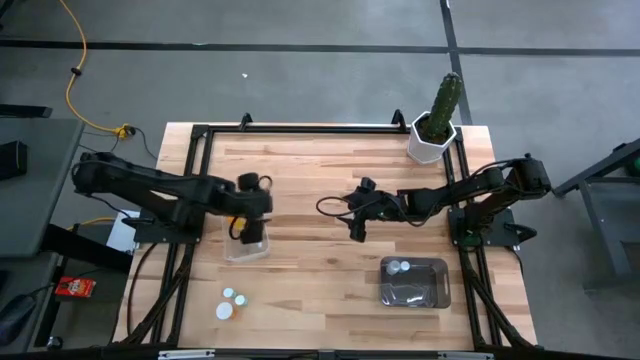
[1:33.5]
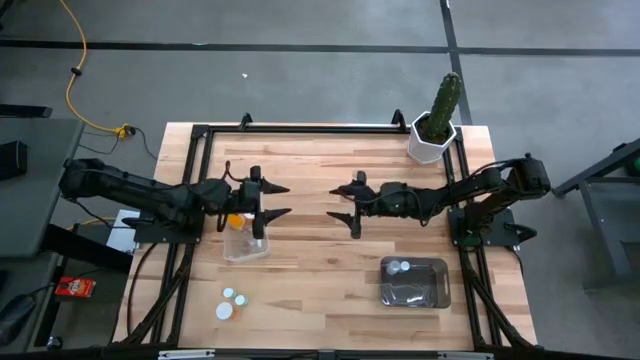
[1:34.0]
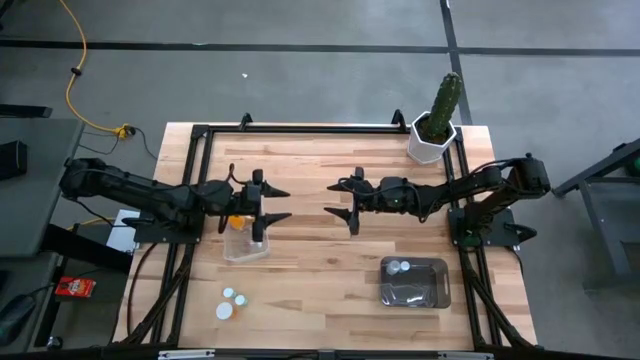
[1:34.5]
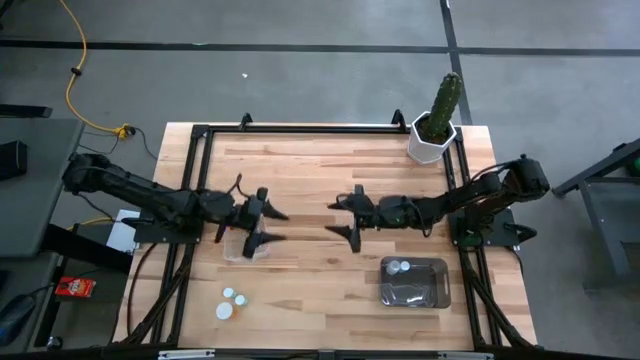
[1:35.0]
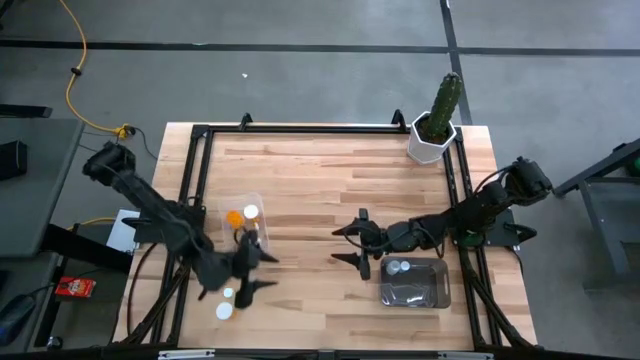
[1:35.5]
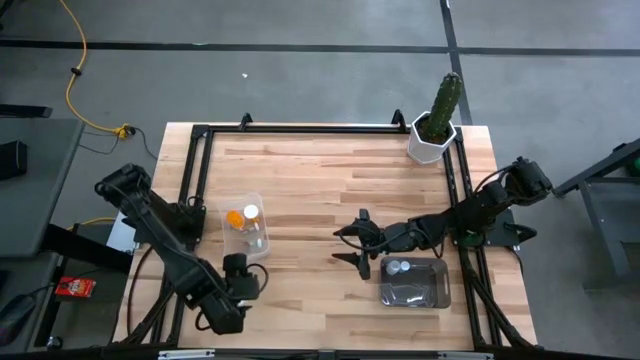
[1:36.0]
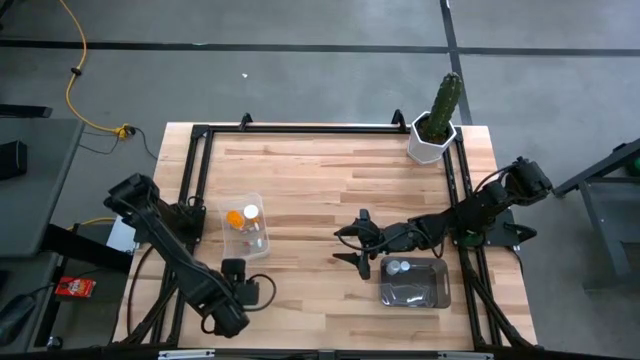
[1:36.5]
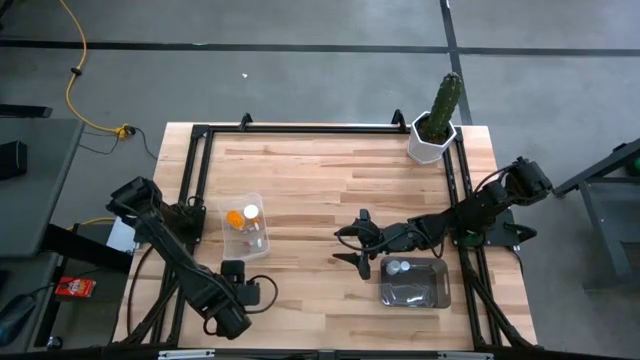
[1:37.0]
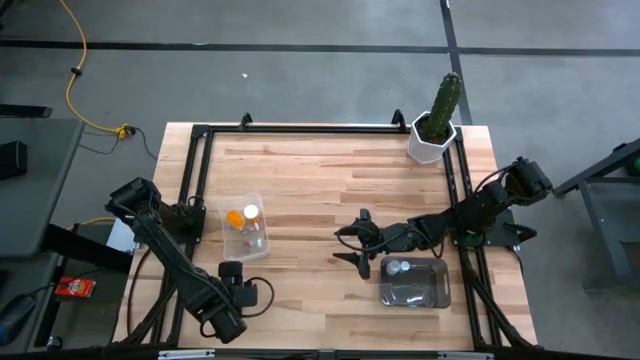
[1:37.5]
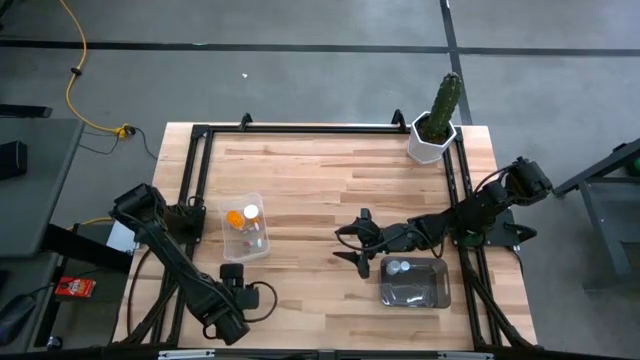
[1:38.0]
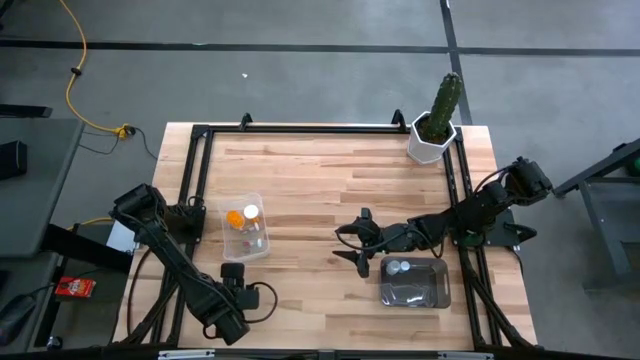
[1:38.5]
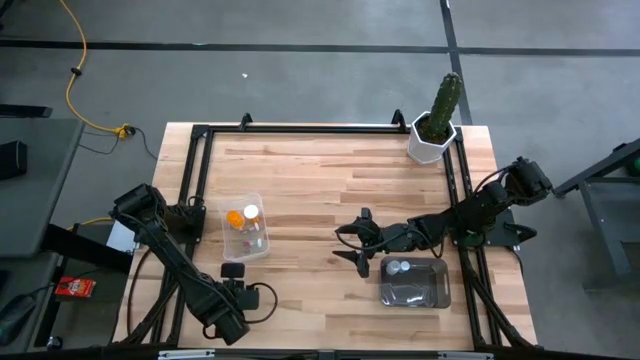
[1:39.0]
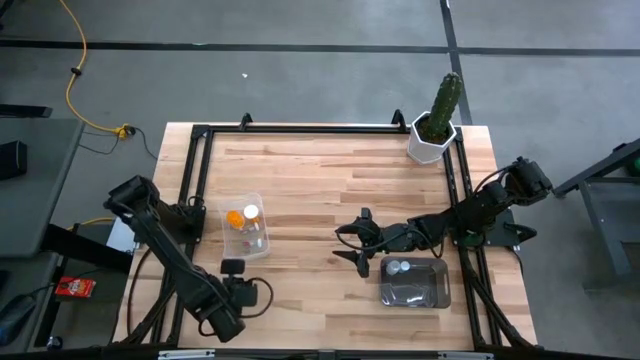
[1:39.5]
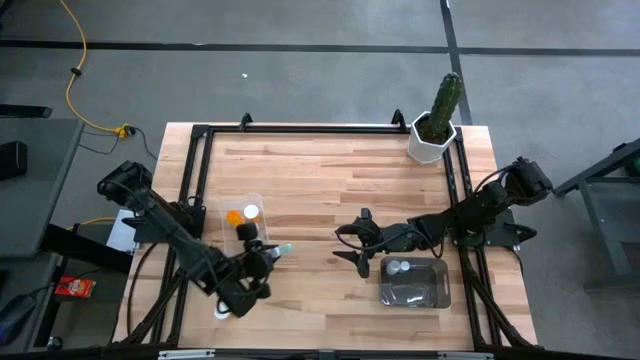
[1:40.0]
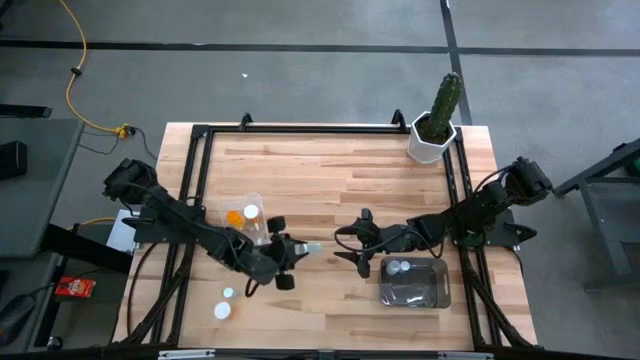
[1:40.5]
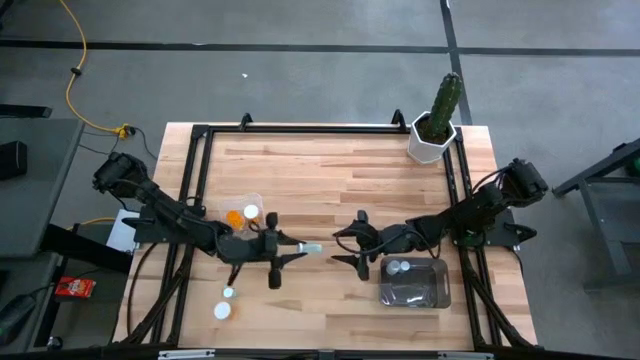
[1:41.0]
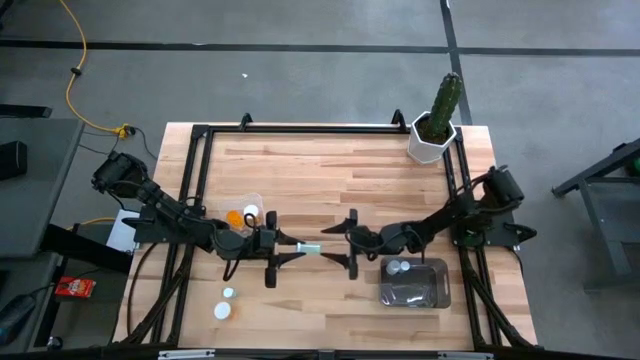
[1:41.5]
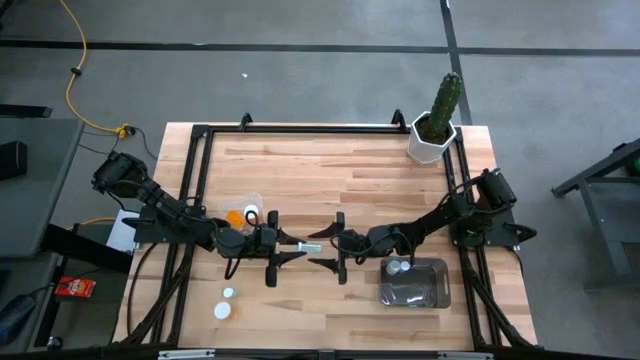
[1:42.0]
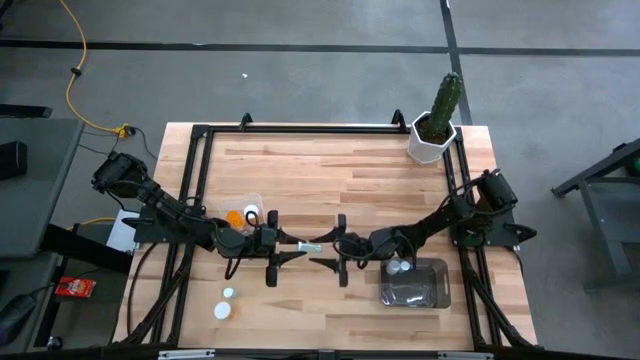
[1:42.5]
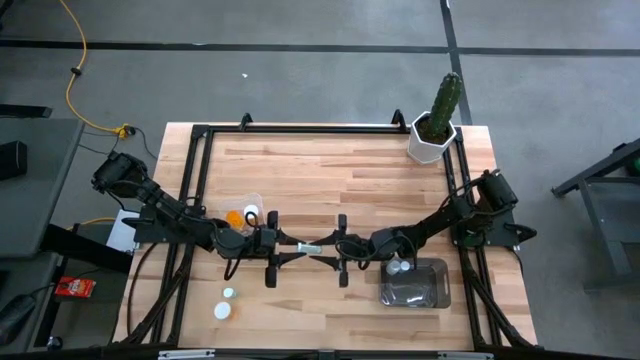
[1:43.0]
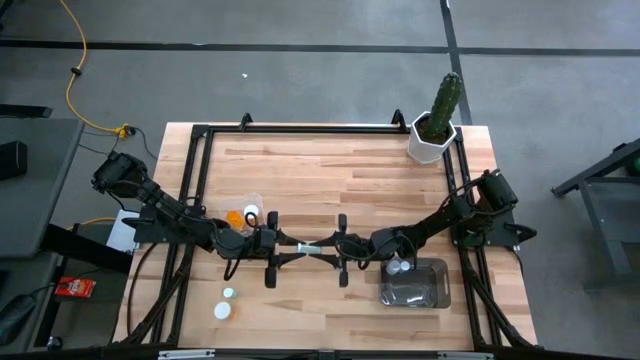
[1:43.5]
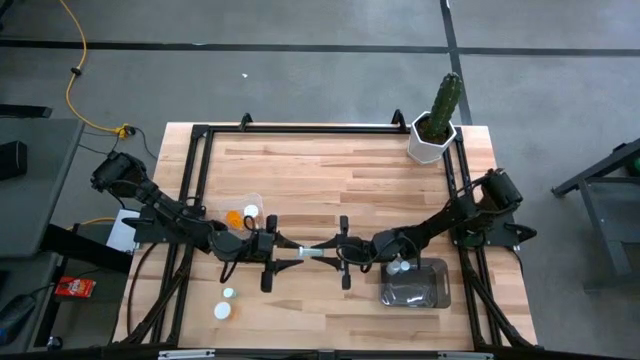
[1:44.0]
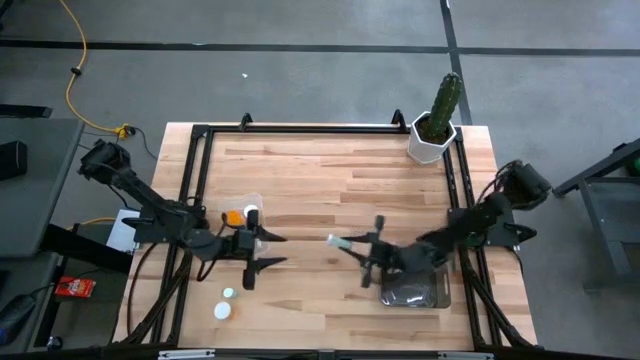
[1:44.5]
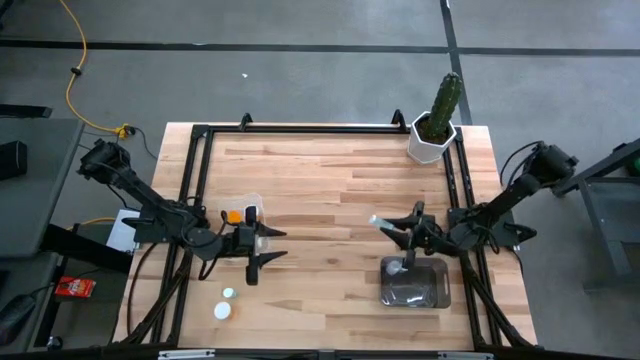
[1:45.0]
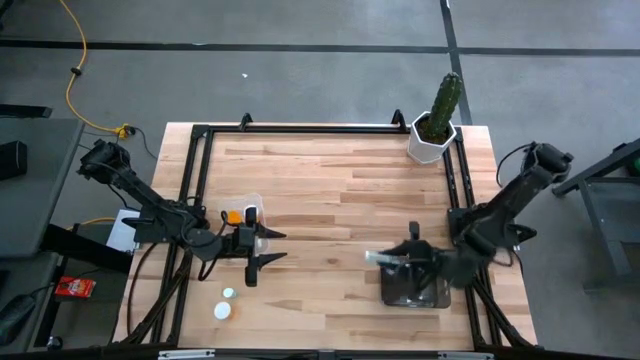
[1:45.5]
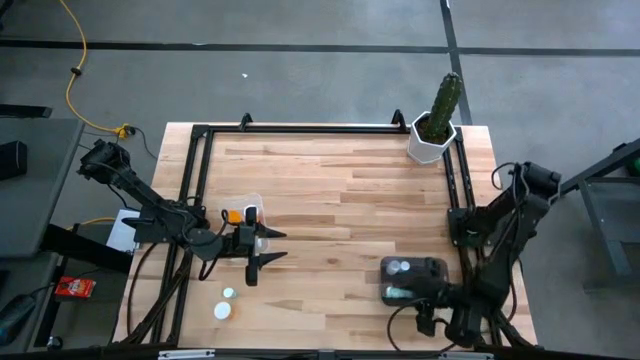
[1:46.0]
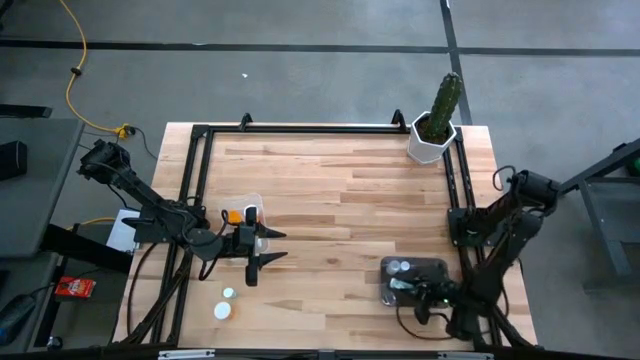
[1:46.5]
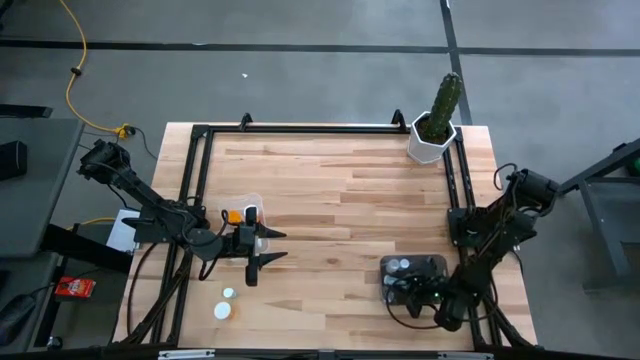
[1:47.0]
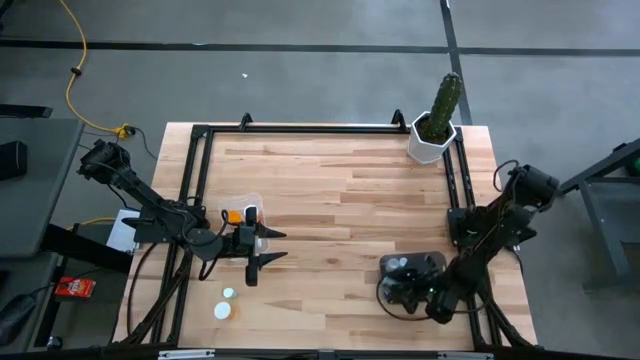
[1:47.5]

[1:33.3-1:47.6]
Task: Pick and place medicine bottles into bin by pill shape (circle, oval)
Put the right blue tablet bottle into the black bin

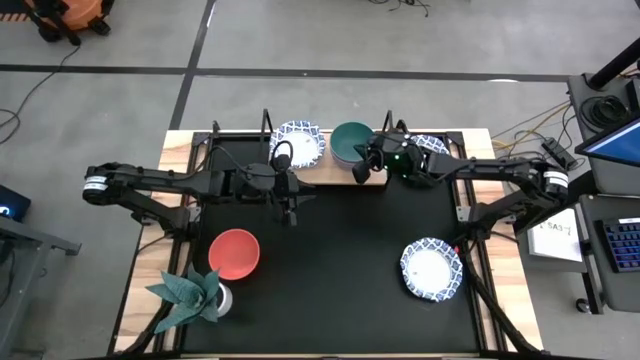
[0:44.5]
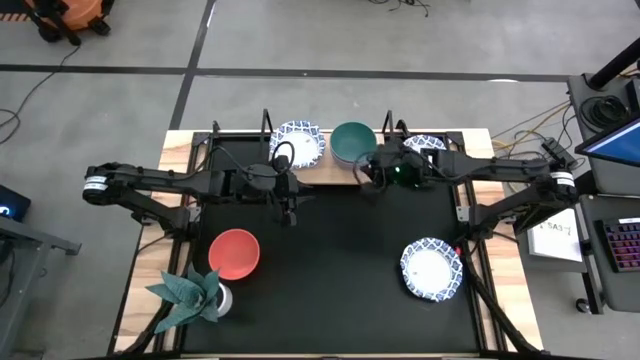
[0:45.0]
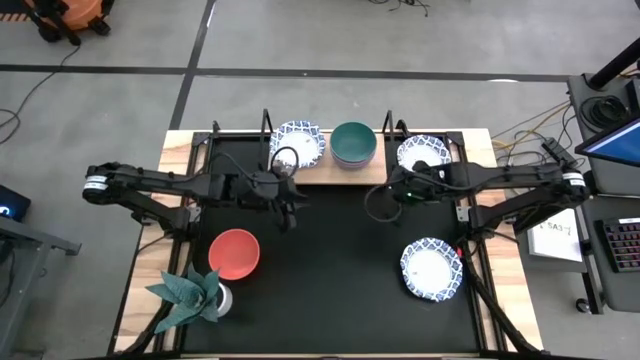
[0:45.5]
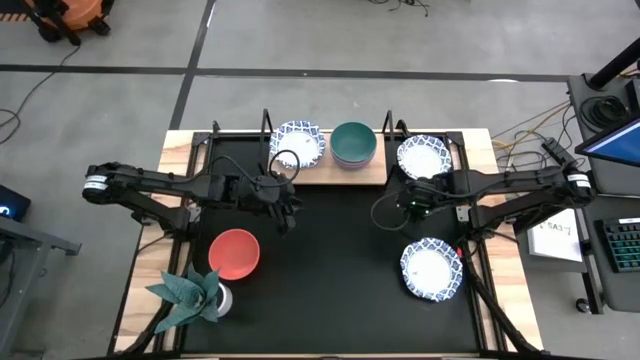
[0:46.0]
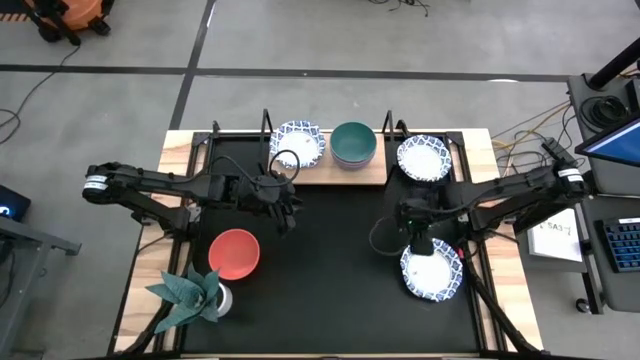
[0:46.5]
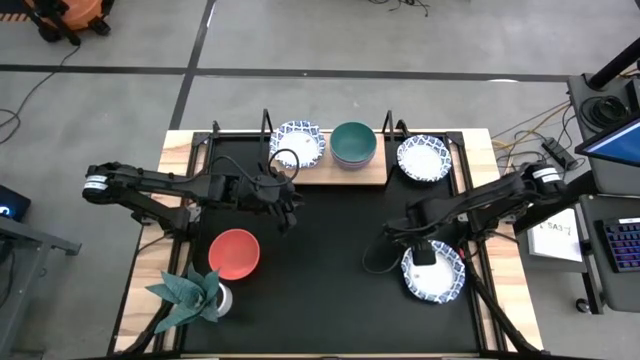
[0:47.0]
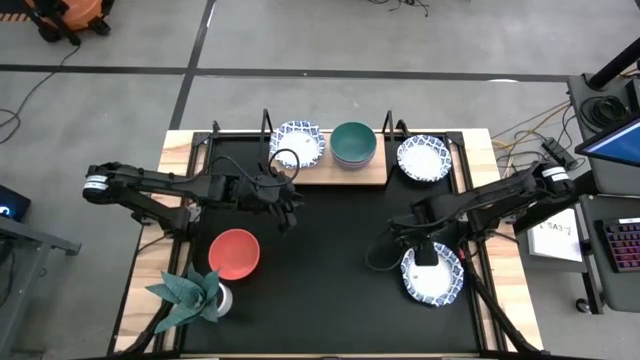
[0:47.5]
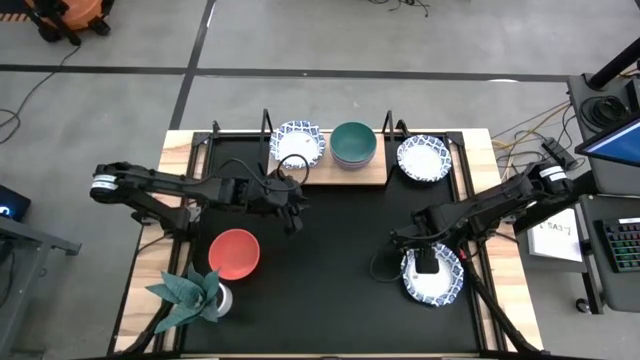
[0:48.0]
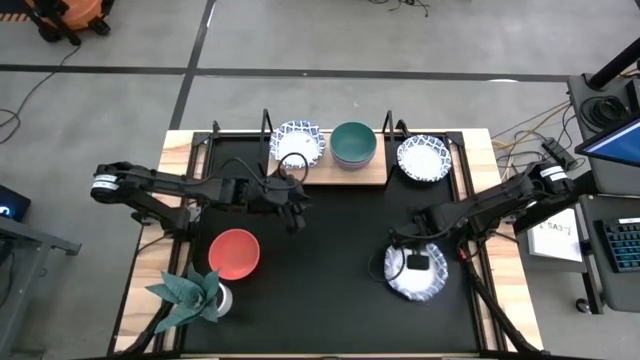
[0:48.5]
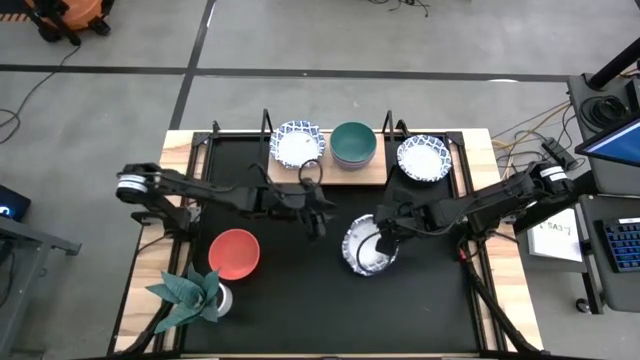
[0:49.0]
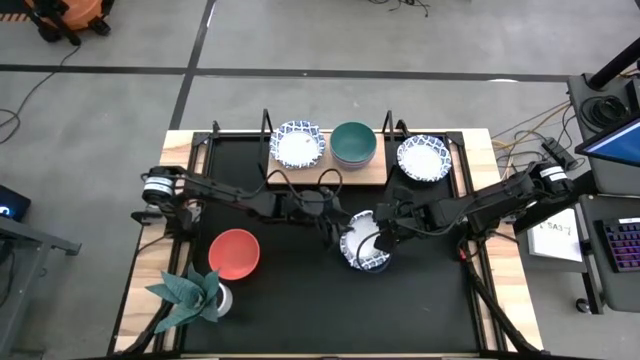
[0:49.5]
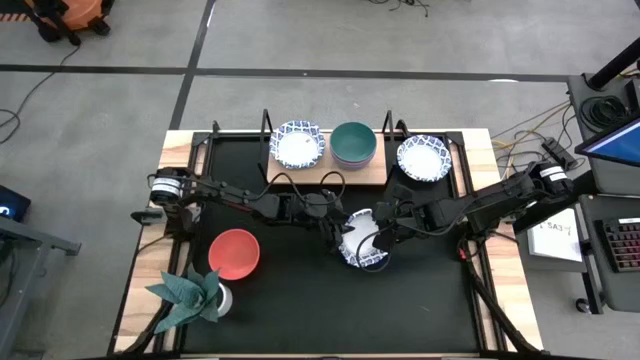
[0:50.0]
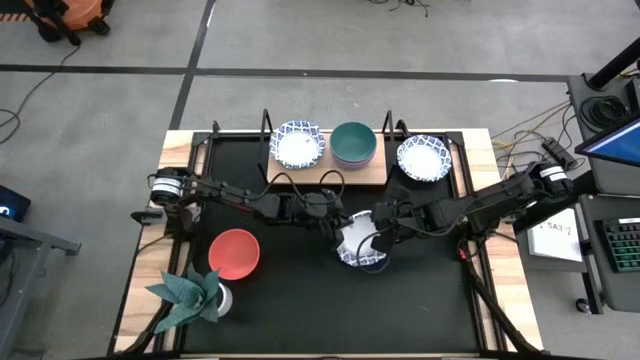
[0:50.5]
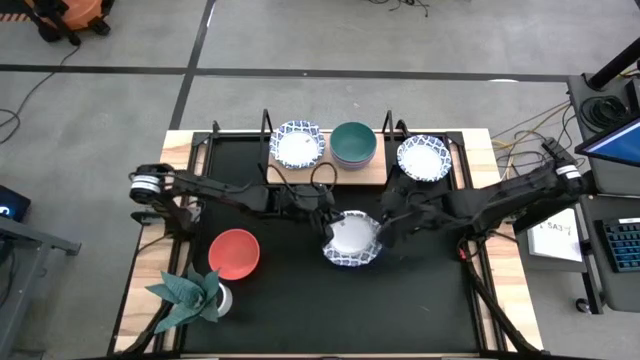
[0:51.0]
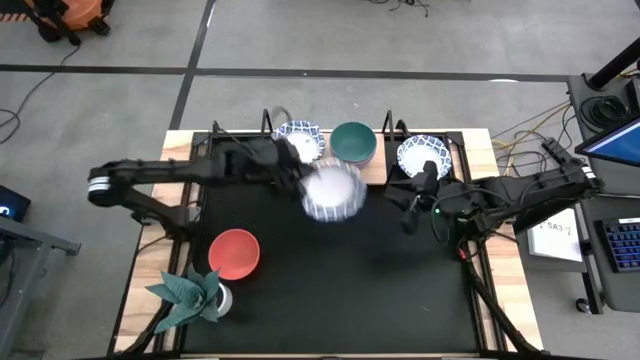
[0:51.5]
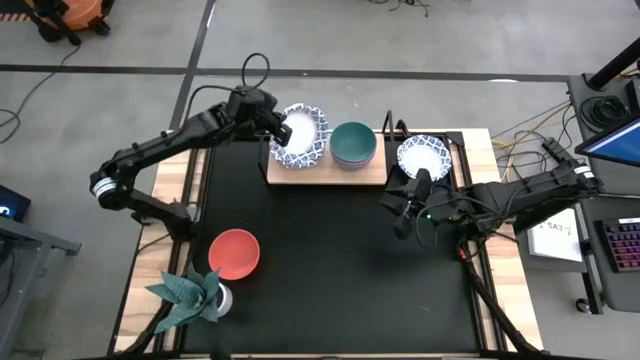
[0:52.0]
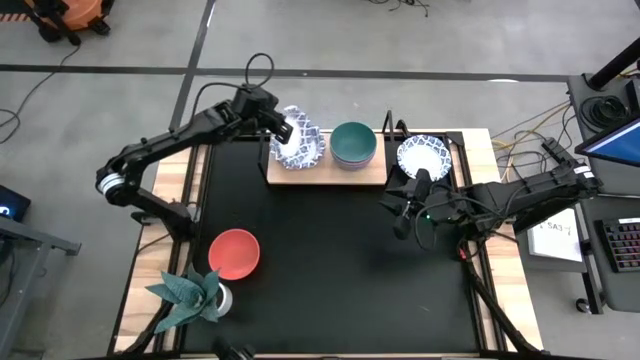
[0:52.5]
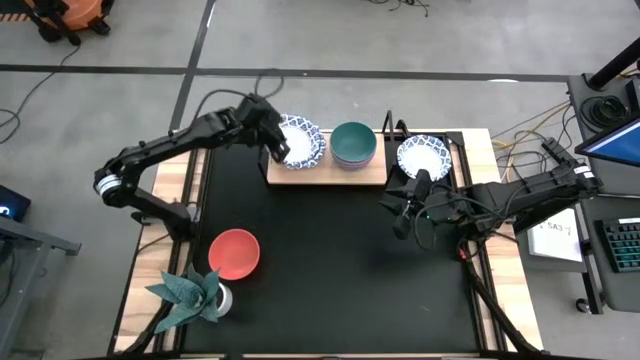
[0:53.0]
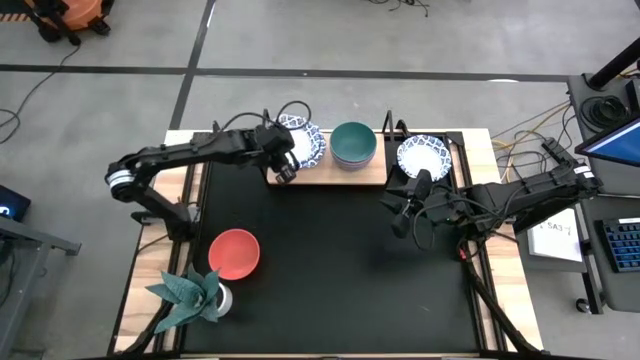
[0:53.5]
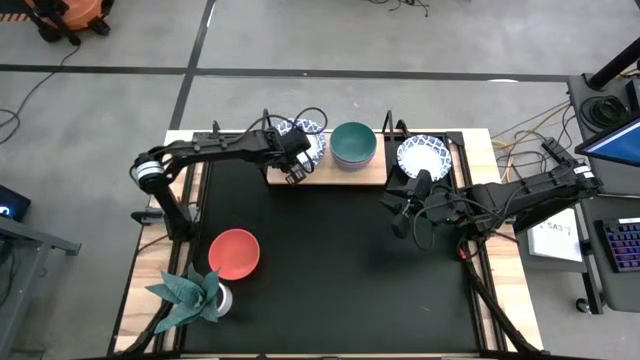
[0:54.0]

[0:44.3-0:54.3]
Task: Place and stack bowls onto a shelf
Stack the white bowl on top of the other white bowls on the shelf
